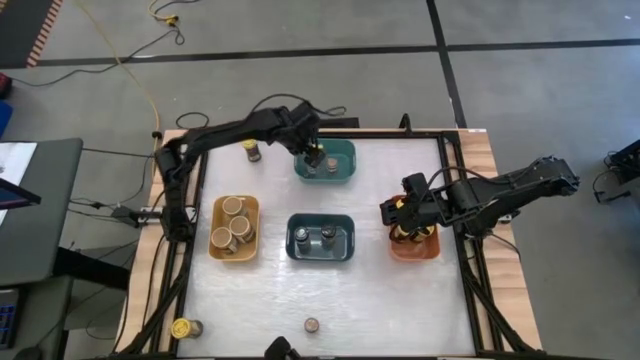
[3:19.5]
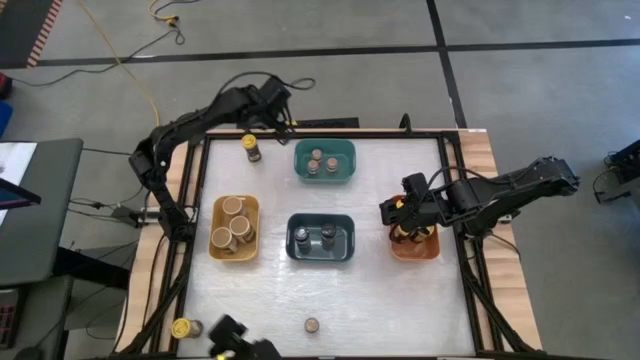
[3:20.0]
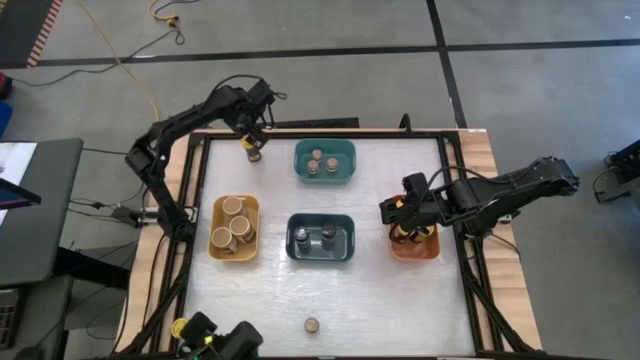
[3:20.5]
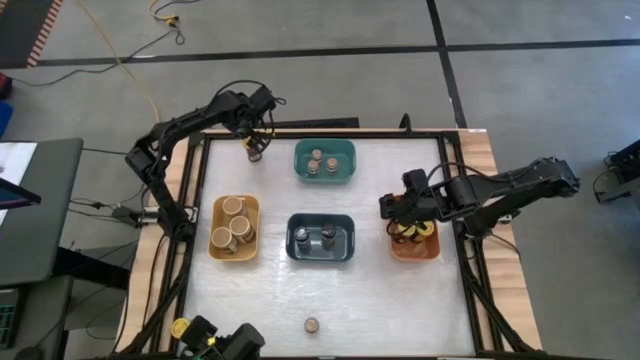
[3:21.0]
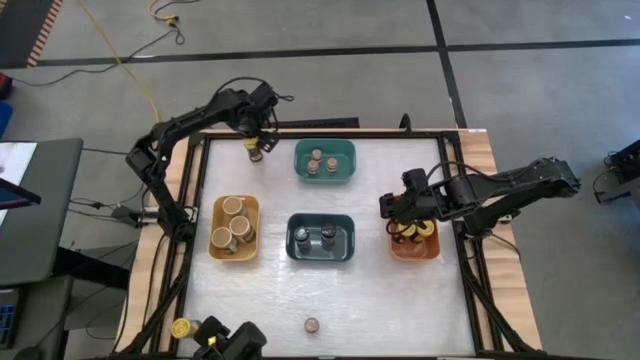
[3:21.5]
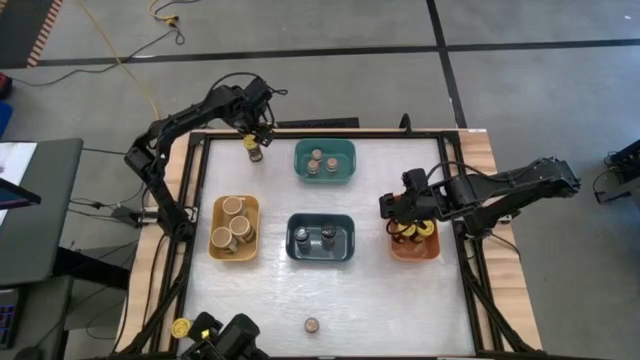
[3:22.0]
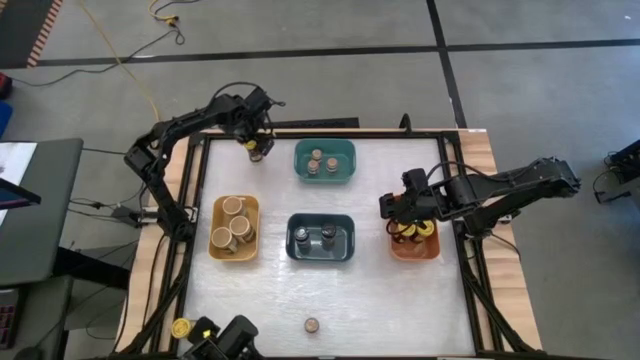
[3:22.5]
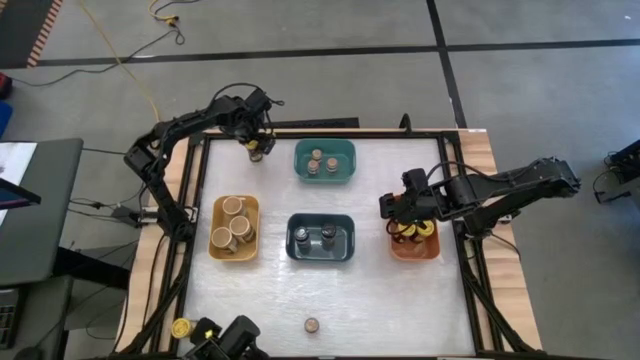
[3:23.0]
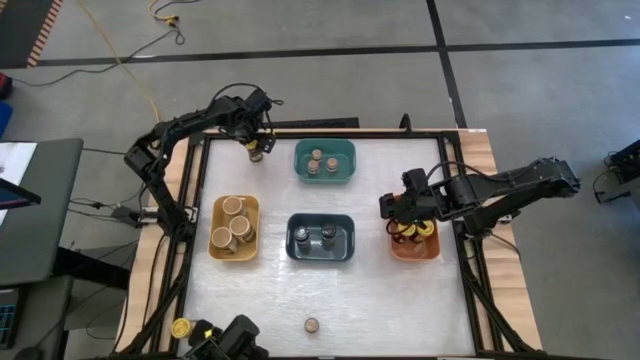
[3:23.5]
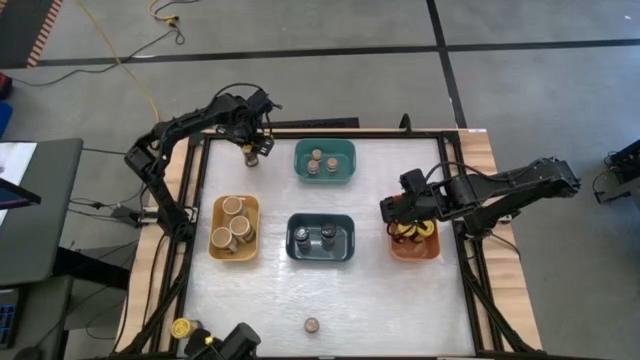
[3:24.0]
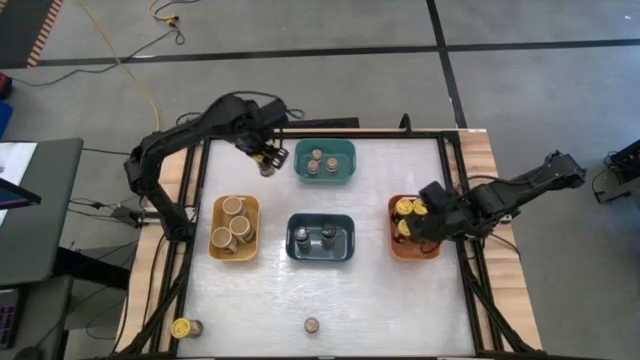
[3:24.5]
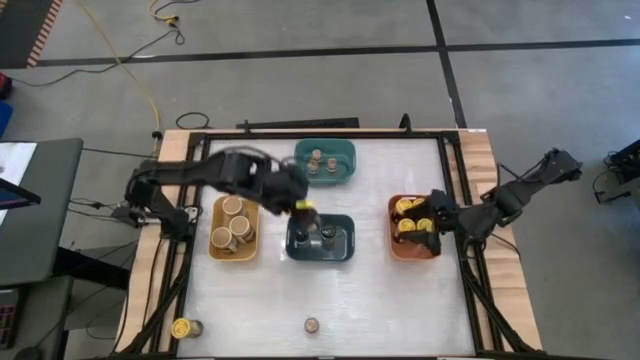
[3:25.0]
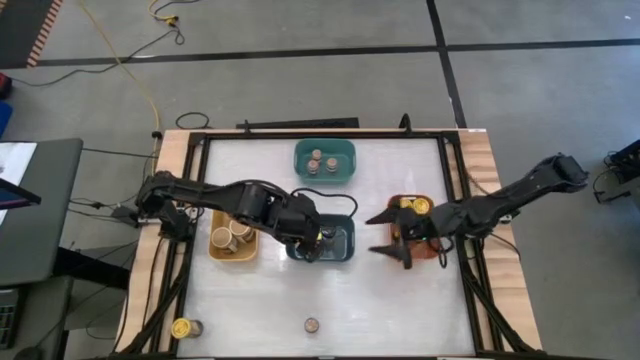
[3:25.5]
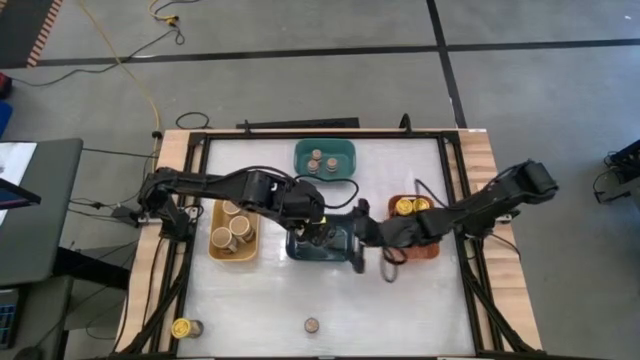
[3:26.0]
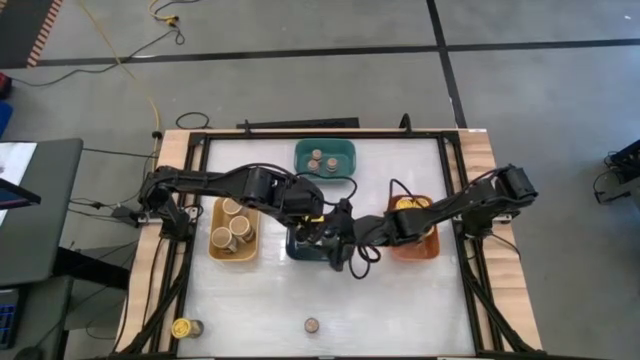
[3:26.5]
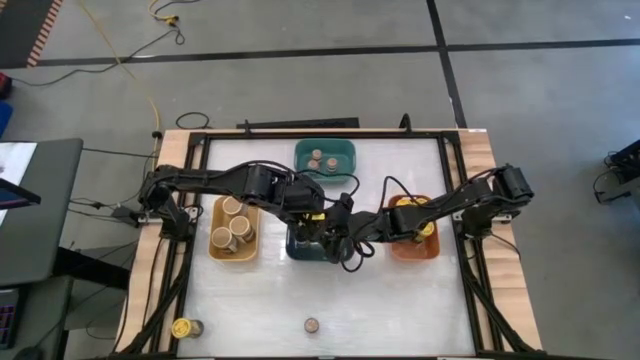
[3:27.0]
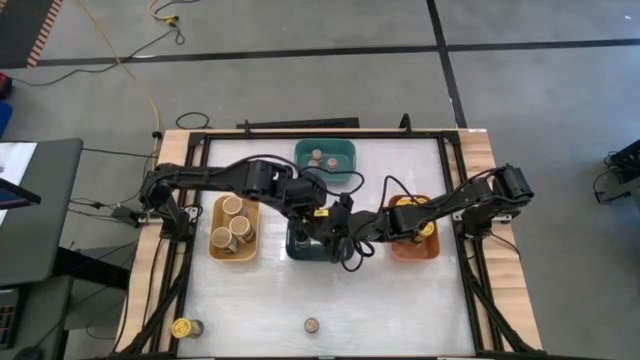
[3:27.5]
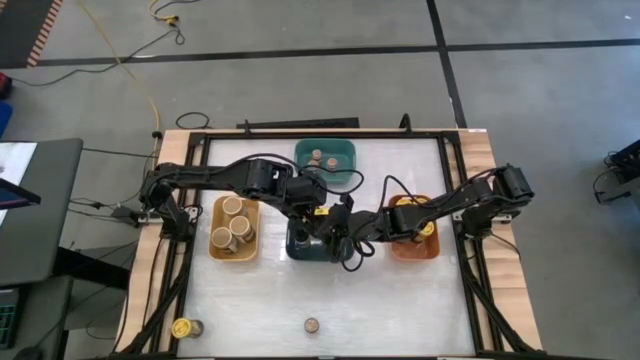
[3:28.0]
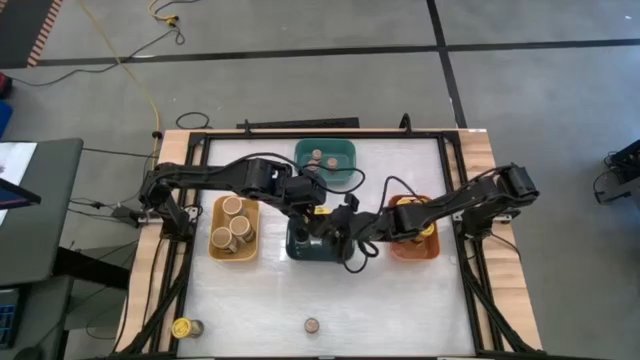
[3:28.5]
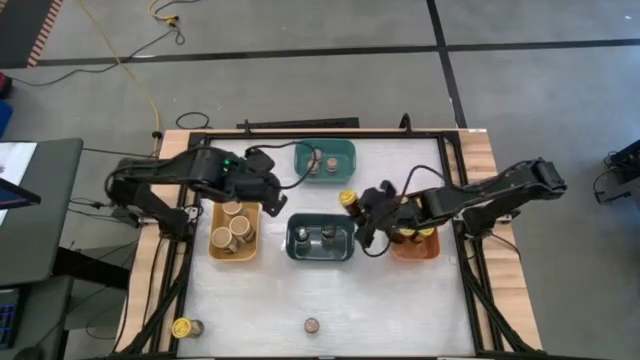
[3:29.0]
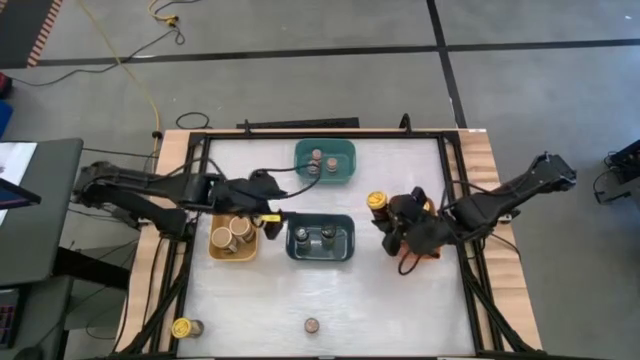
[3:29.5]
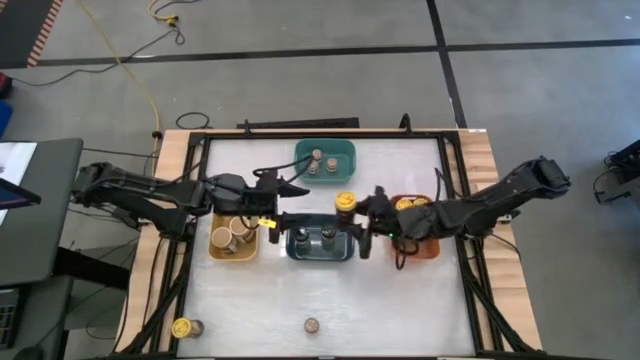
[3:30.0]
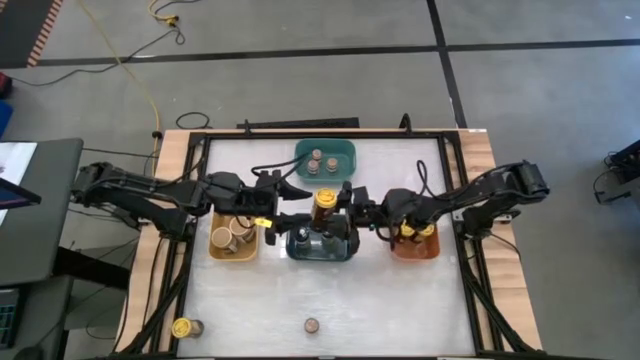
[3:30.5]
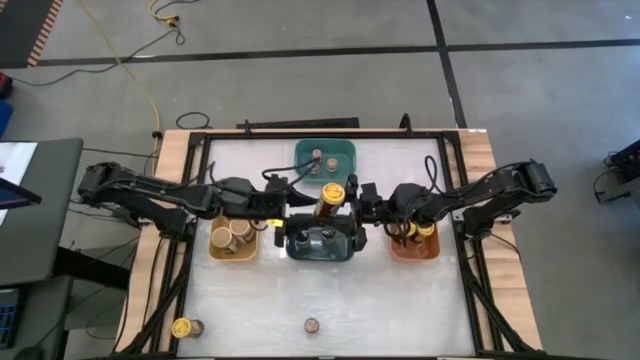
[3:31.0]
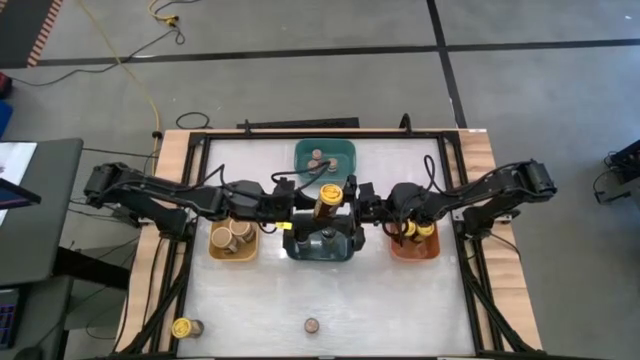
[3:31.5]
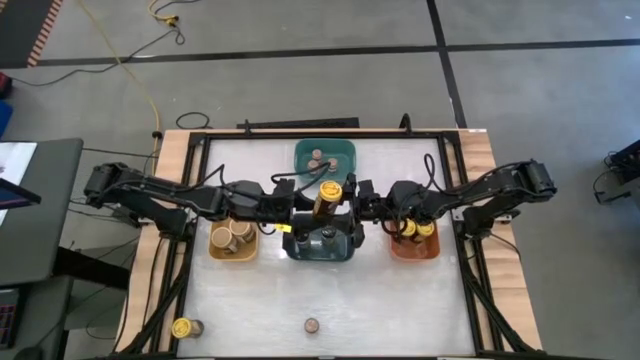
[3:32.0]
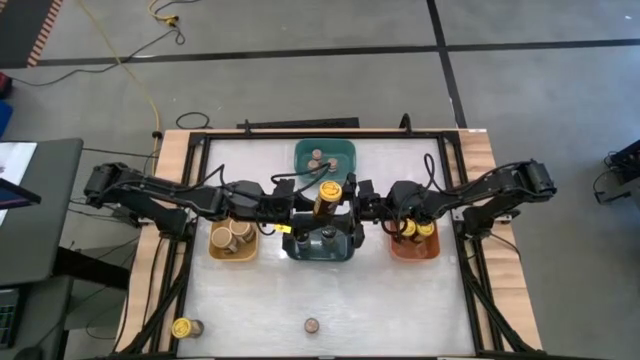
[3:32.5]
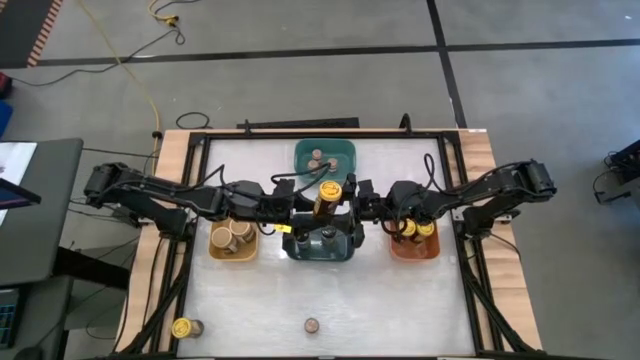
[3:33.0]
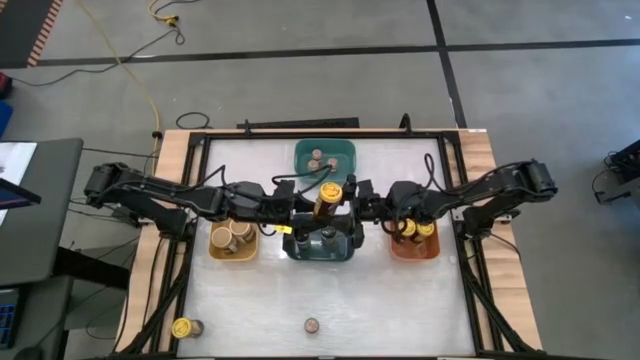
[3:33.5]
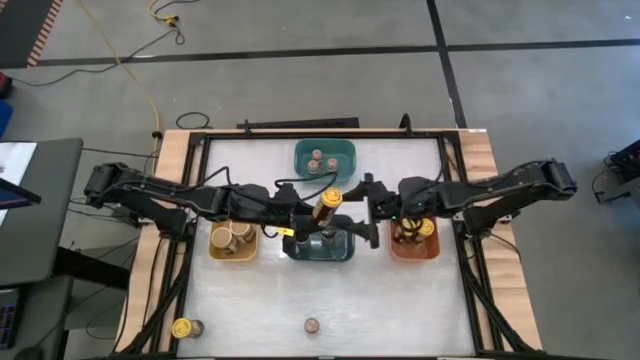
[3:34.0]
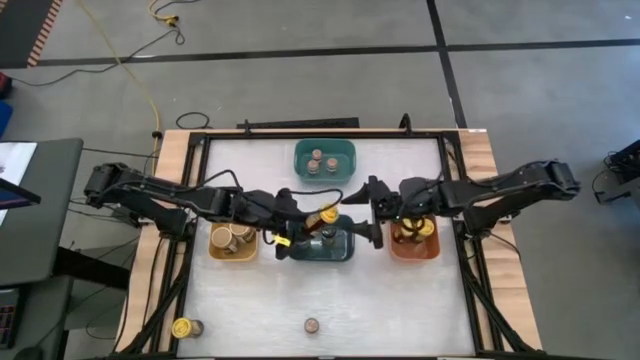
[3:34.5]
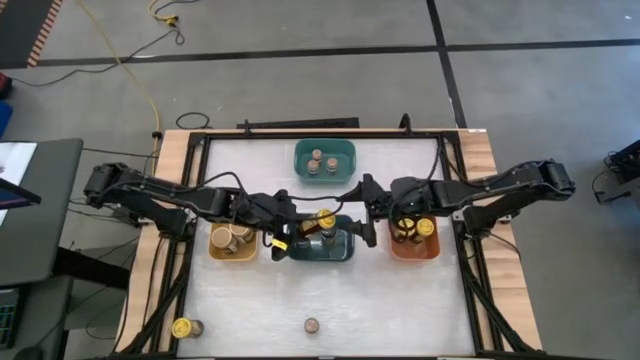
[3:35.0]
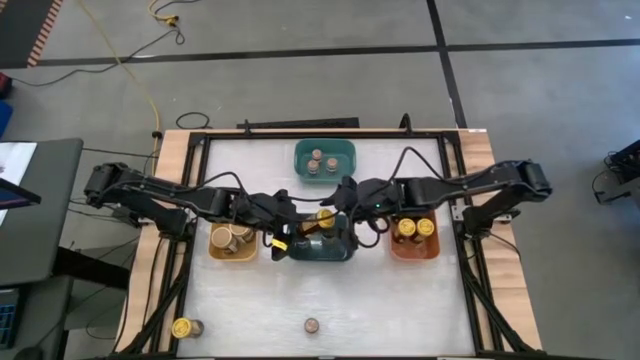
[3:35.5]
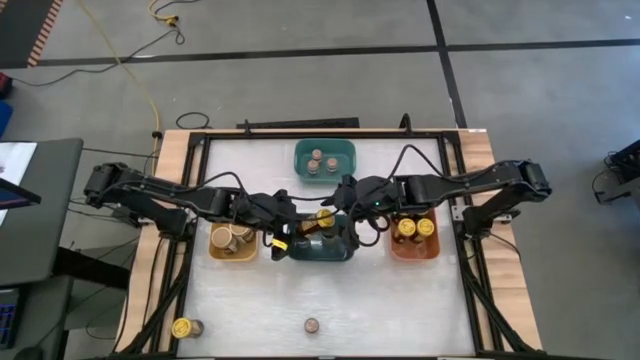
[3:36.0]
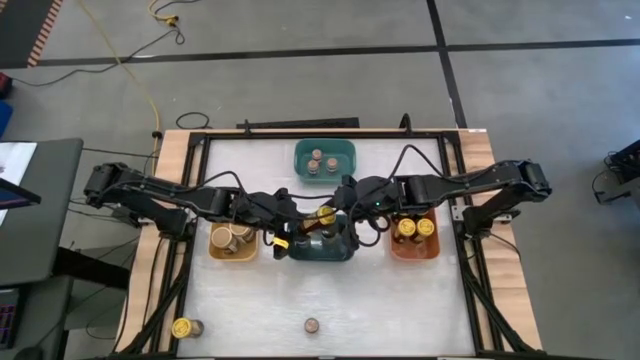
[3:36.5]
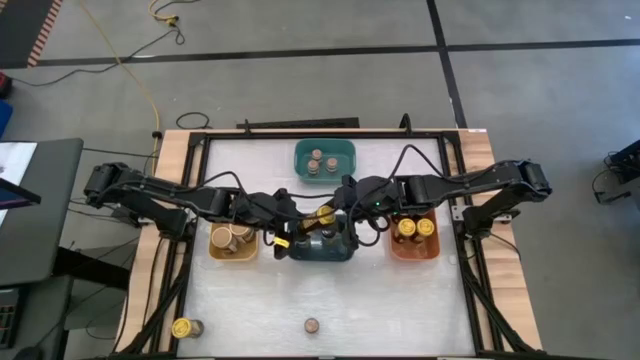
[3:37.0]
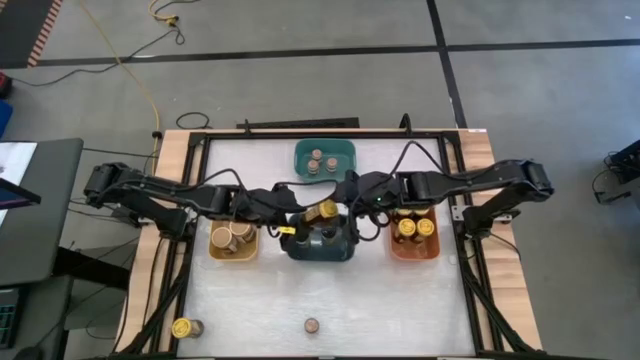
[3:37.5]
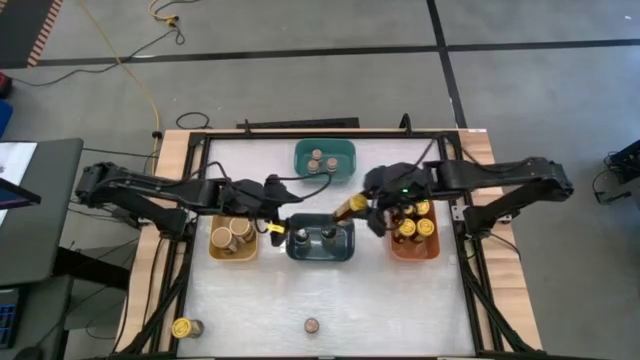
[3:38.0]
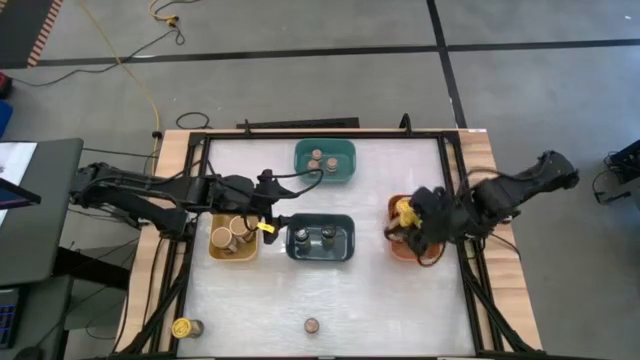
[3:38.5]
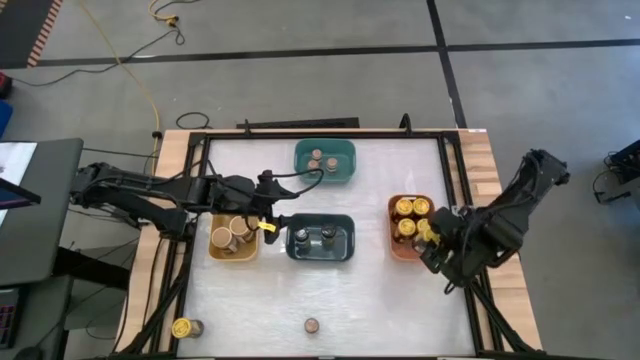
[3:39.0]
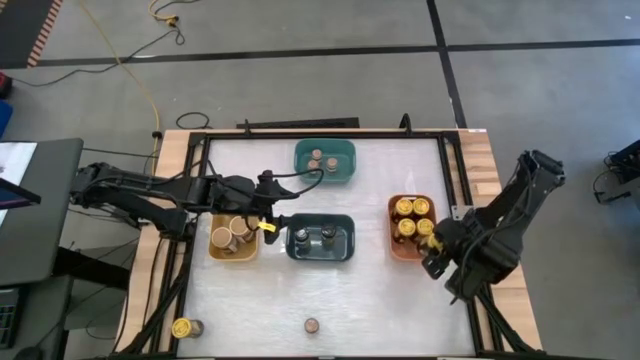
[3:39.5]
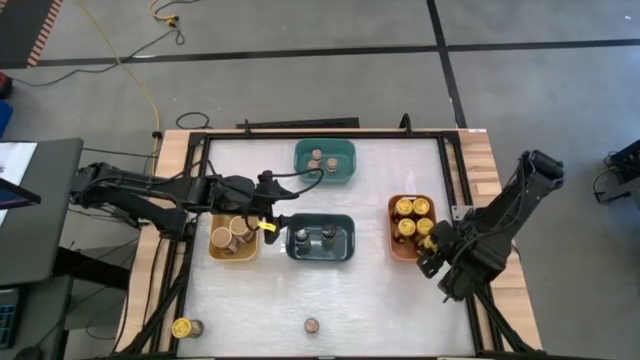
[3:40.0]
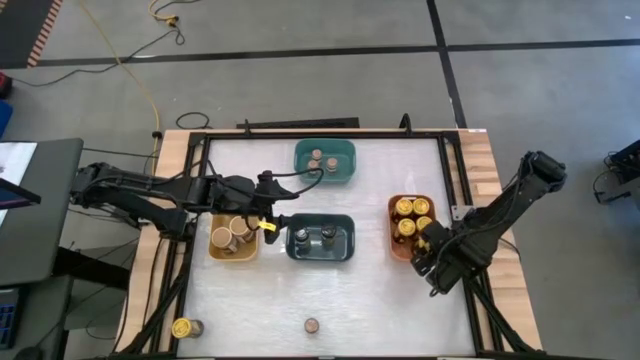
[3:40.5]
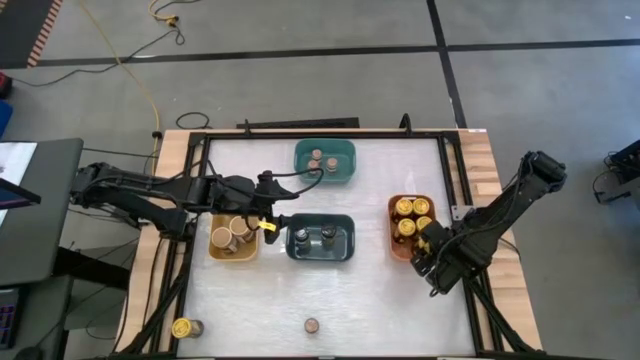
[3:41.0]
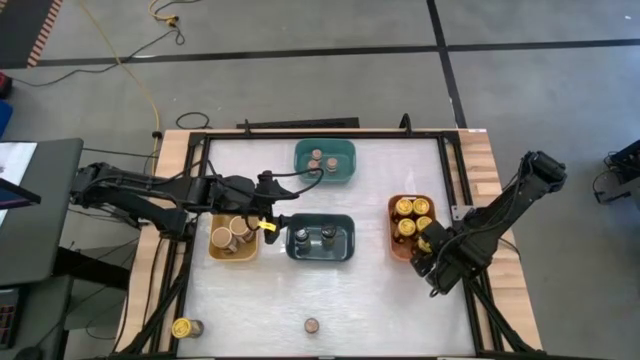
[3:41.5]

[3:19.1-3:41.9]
Task: Sort spices by type
Put the yellow seasoning bottle into the orange bin
